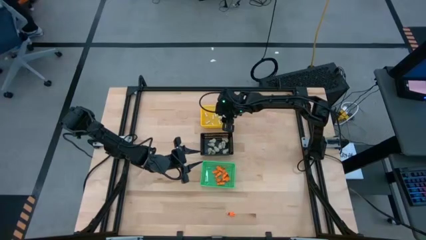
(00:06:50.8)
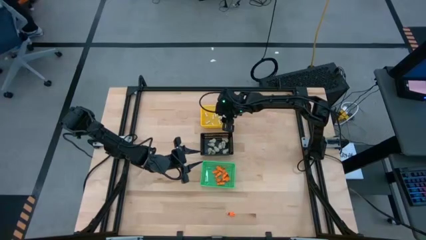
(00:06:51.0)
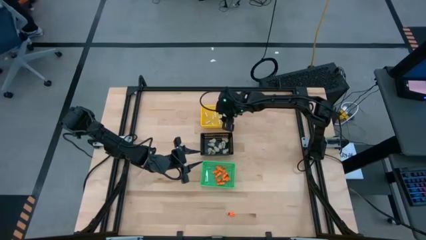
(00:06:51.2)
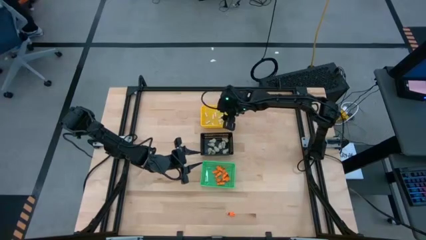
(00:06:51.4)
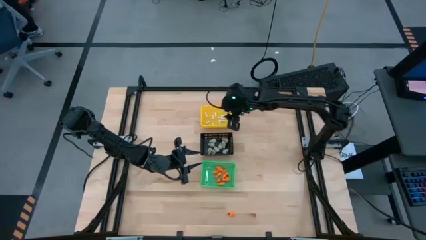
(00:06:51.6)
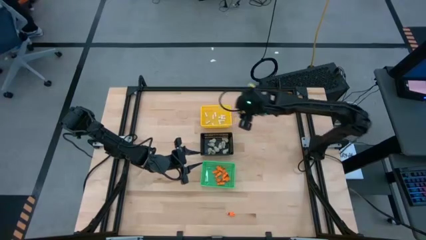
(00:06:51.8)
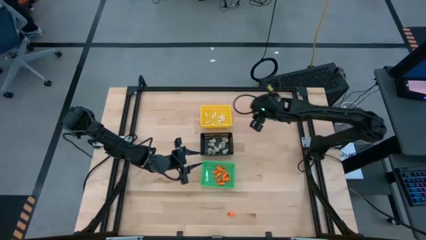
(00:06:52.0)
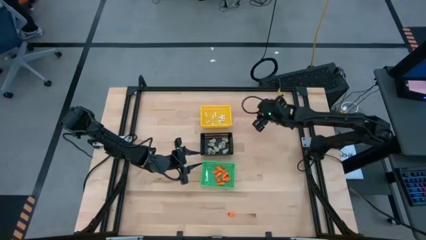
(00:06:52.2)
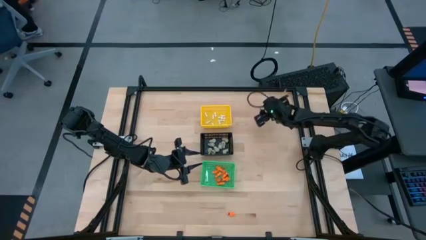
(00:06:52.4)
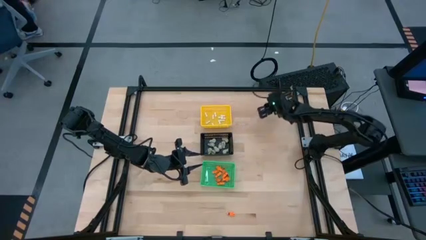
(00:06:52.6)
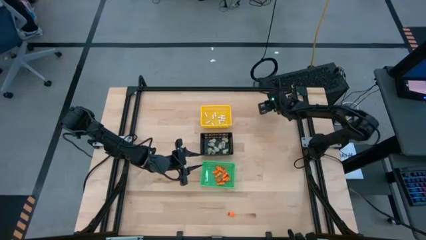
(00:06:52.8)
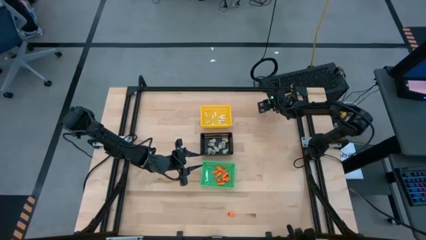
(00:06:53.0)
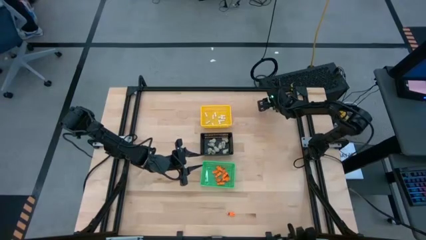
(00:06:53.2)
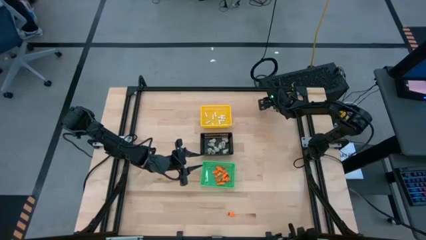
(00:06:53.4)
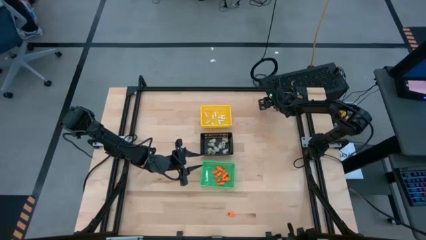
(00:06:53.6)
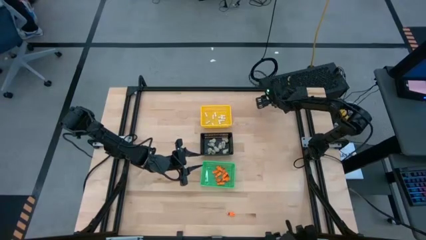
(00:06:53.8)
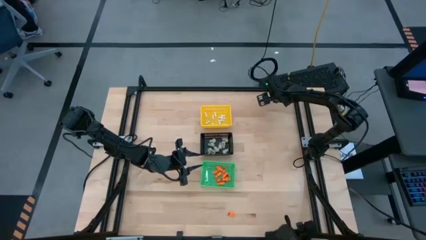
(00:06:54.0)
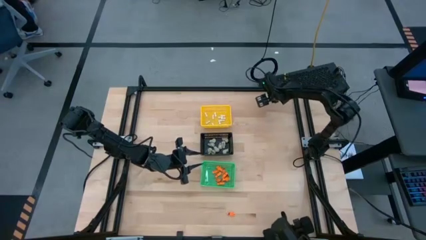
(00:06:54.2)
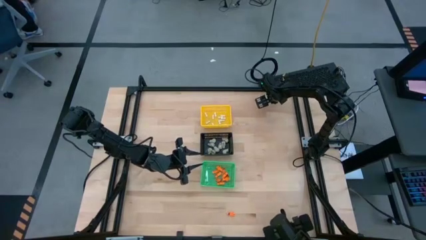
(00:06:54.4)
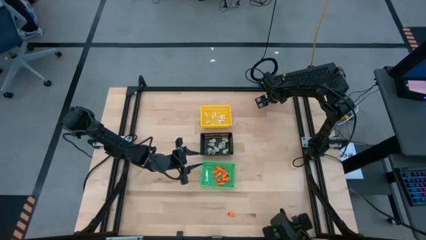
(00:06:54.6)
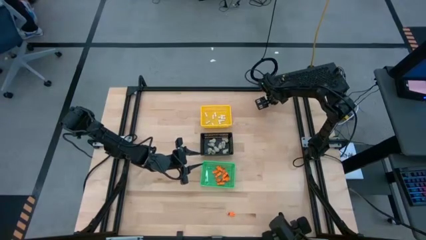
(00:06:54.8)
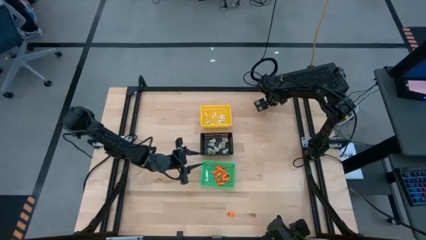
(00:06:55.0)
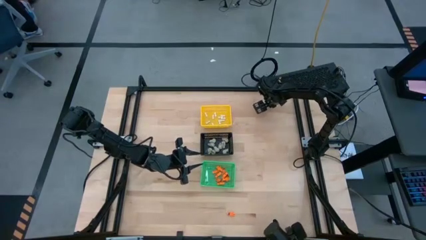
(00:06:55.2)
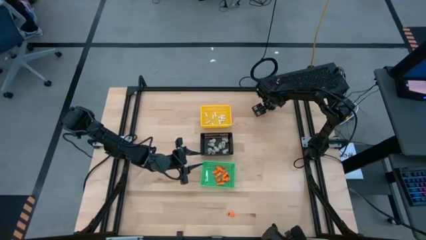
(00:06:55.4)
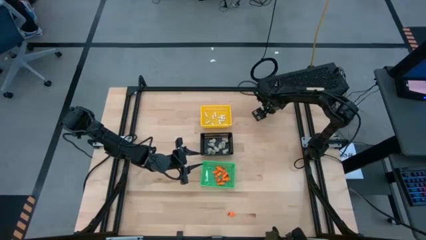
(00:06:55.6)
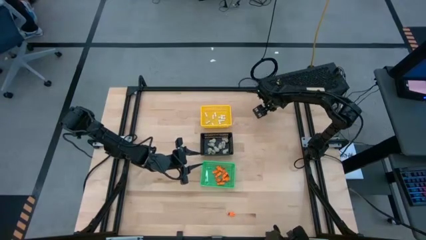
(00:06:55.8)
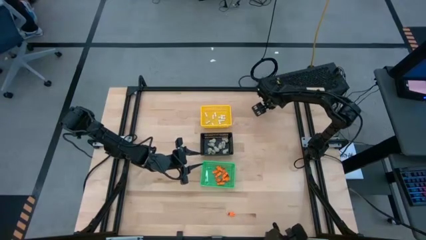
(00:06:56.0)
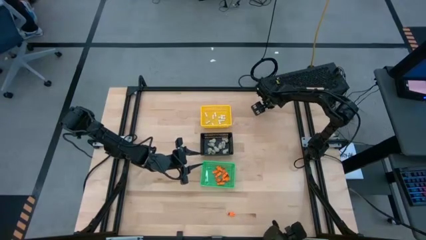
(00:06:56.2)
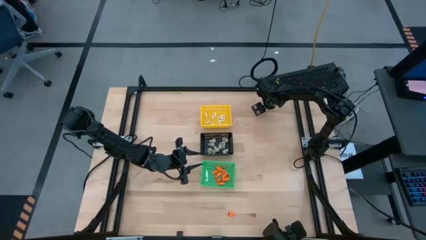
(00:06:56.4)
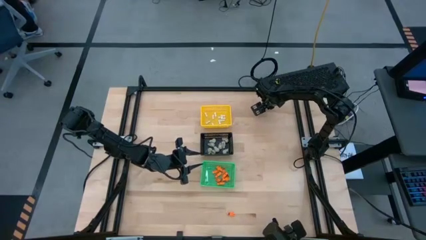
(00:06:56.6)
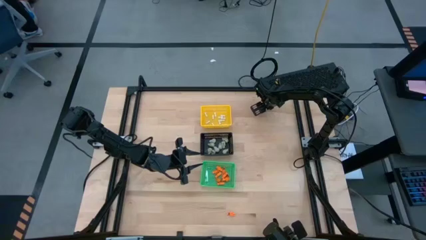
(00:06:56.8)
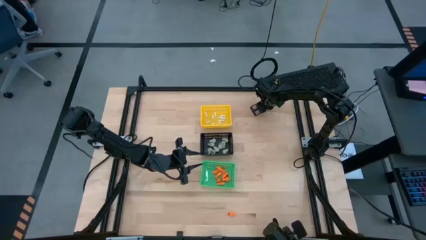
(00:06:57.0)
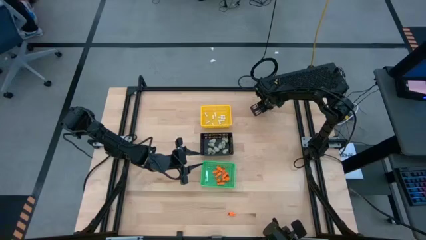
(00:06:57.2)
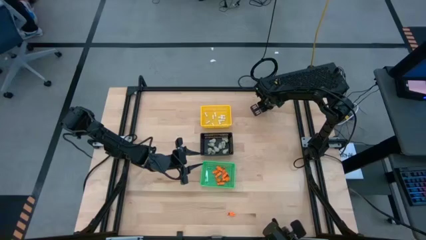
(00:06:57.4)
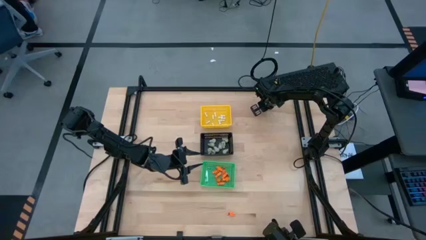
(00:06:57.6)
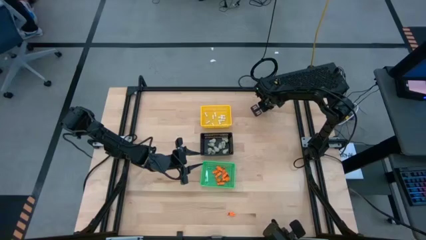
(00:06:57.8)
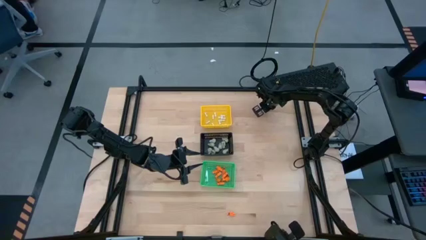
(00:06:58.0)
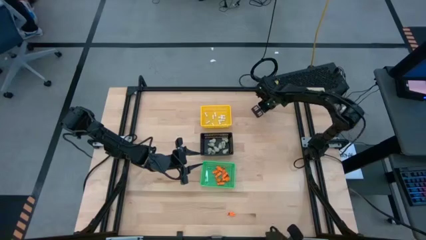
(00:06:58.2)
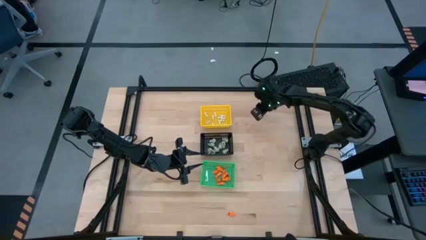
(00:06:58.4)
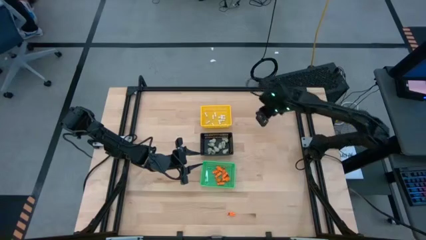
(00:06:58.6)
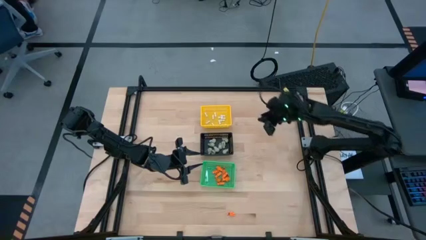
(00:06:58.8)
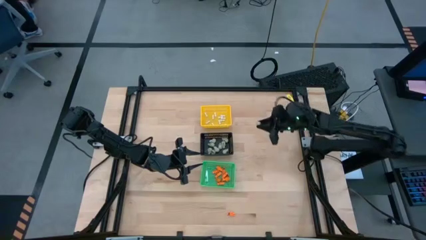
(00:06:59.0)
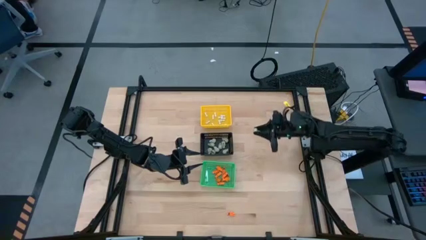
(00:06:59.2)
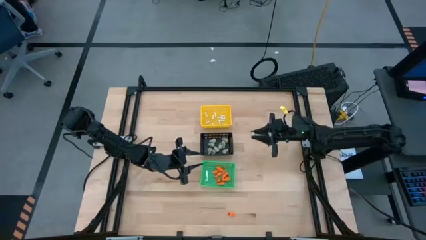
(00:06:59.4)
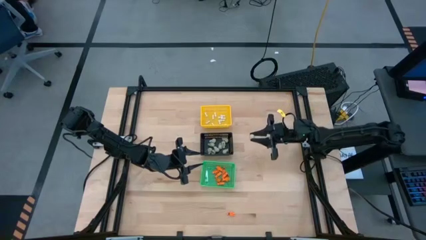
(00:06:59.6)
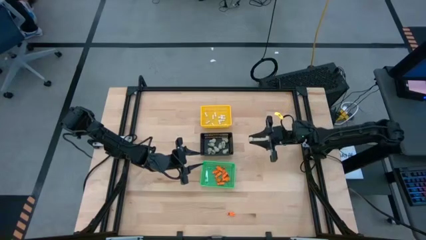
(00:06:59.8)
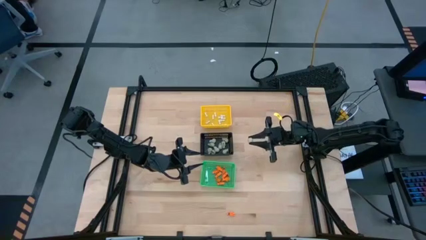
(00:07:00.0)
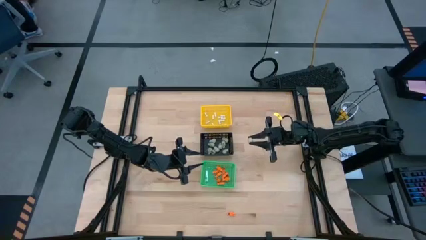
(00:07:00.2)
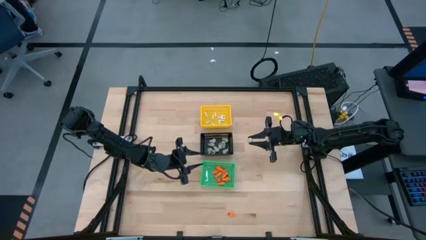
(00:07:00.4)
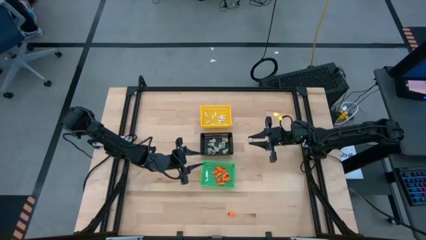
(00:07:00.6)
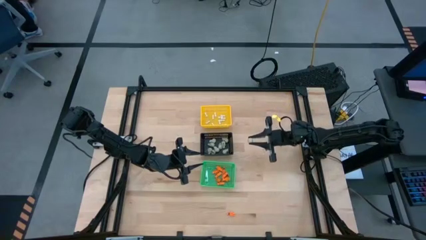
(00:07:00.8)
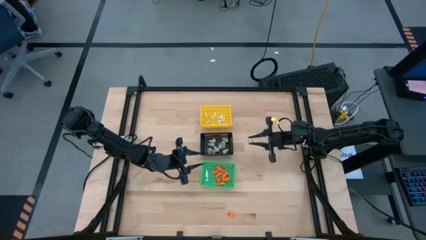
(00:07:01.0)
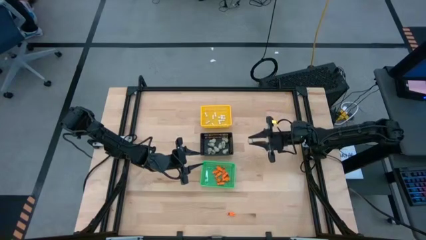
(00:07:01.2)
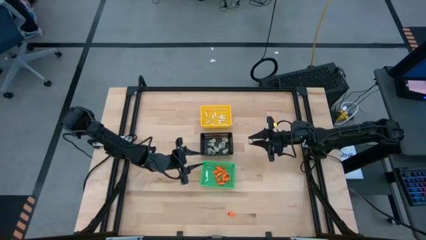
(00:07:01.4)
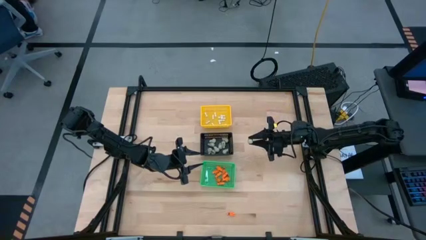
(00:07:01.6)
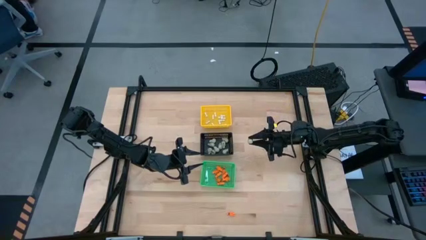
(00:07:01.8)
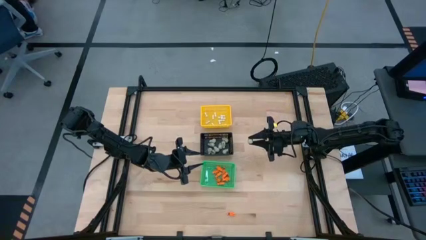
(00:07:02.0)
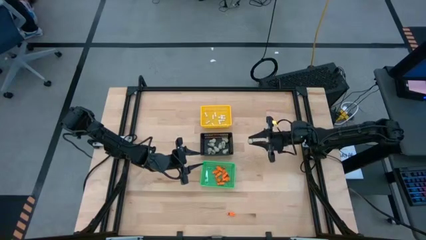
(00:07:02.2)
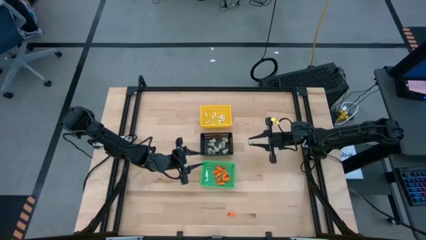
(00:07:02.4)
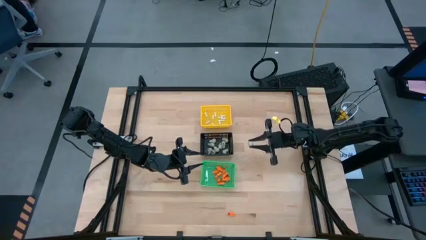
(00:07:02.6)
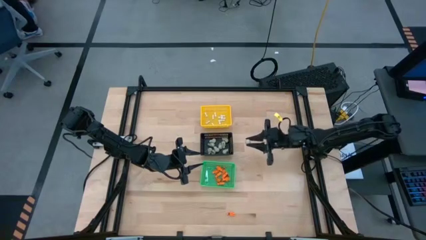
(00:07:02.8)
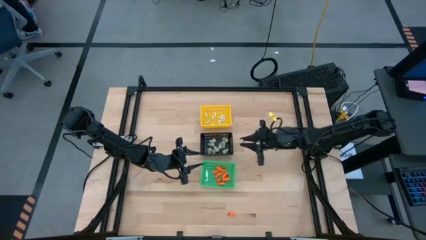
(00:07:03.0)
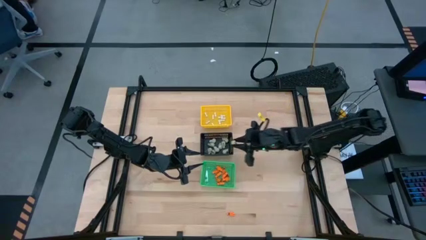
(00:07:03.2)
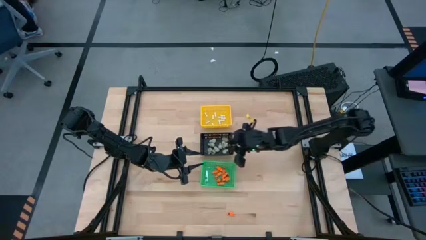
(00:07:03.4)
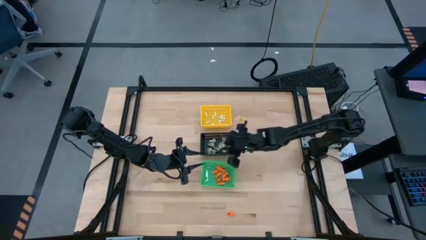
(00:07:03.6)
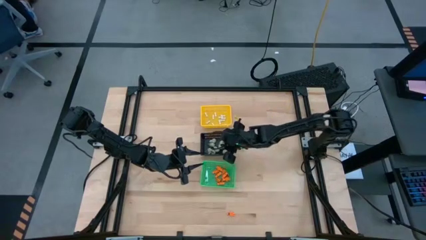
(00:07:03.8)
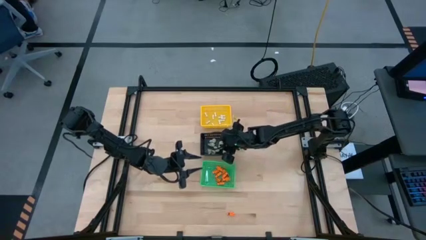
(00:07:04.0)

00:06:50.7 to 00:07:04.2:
Task: Sort Halloween decoration
Put the gray skull toy into the black basket

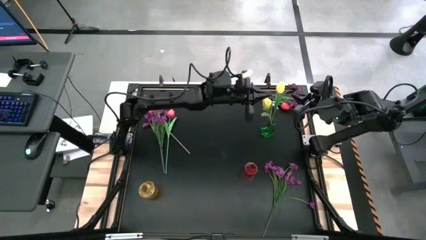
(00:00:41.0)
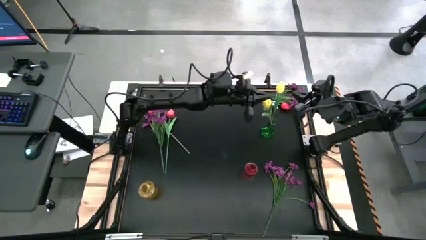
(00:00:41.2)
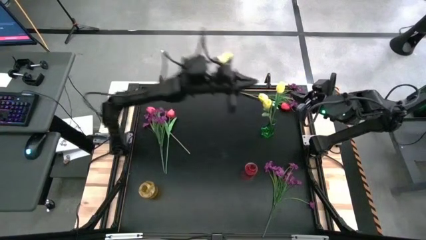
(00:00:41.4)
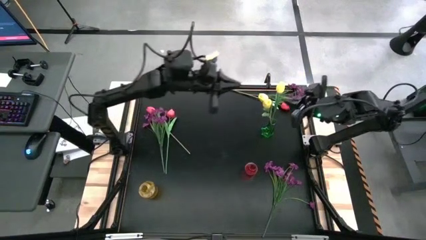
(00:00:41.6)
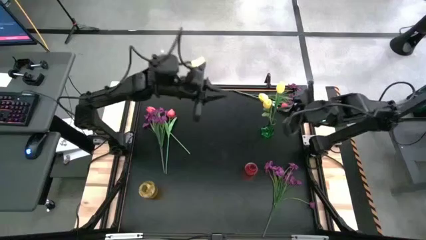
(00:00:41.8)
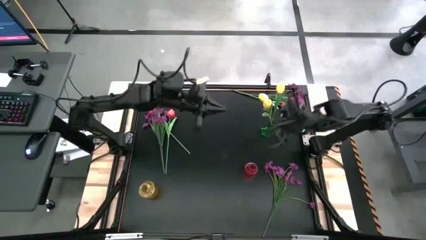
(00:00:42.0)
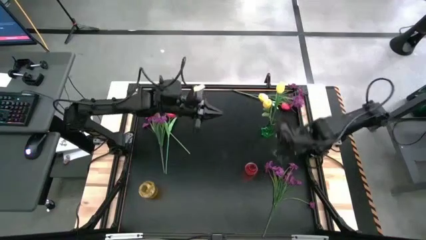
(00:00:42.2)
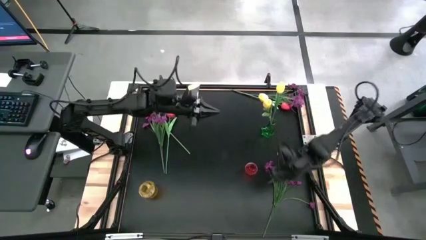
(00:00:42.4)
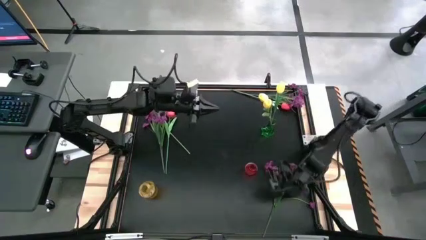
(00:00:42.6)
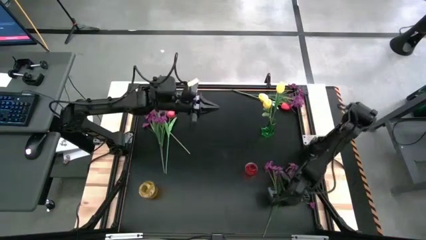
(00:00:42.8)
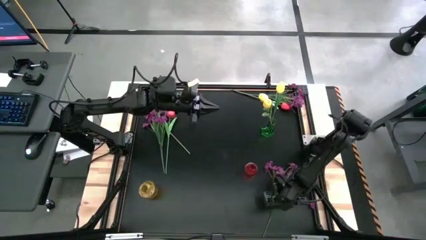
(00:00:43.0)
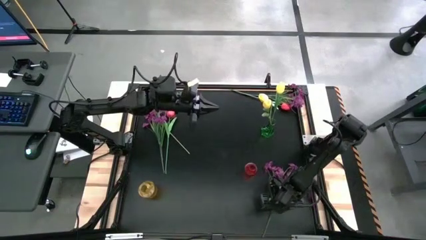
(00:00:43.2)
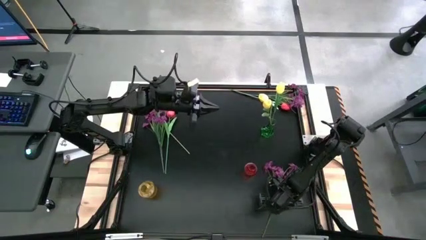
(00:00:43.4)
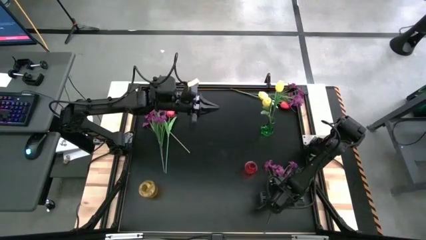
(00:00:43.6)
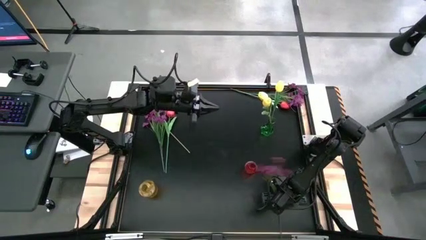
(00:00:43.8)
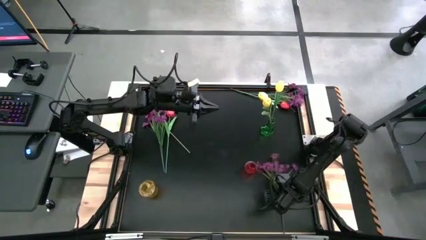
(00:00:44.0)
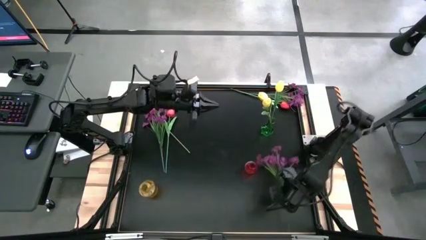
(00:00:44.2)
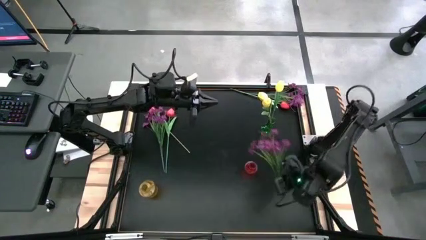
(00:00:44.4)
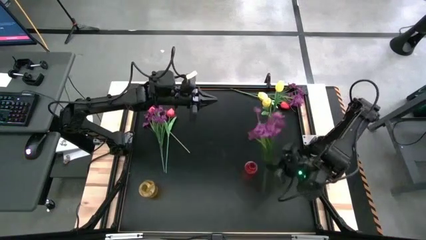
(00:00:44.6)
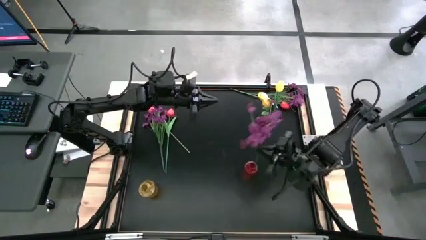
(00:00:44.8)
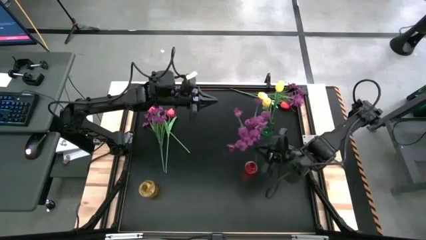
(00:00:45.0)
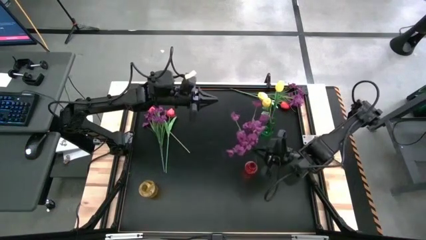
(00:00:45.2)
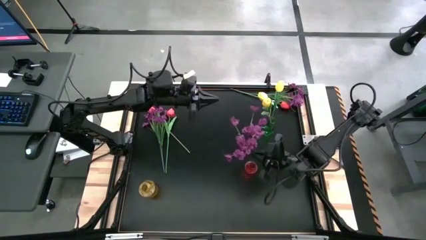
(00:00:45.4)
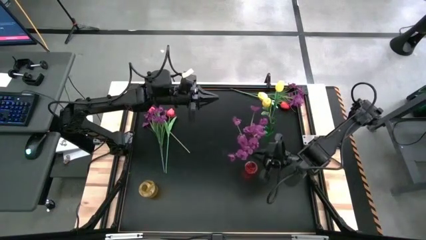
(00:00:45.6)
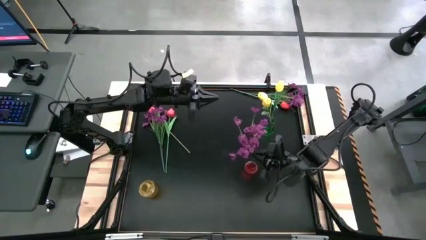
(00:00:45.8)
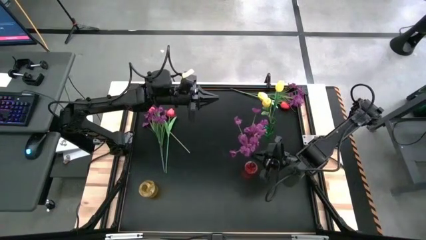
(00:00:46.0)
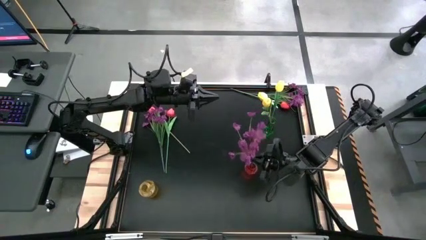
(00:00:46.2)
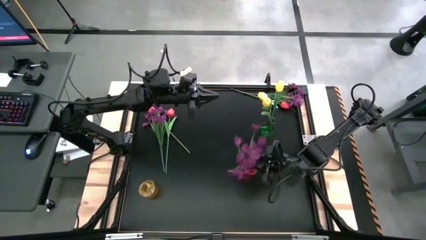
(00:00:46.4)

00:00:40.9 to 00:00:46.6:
Task: Sort flowers into vase by color
Put the bottom purple flowers into the red flower vase
